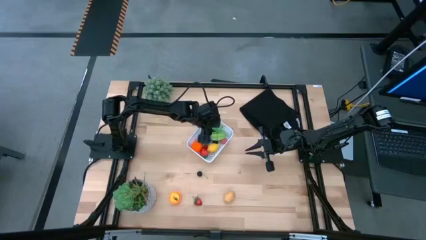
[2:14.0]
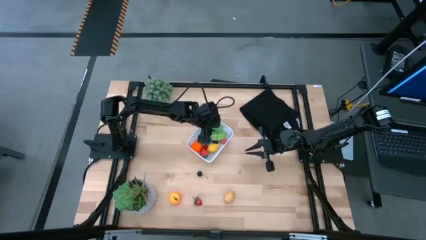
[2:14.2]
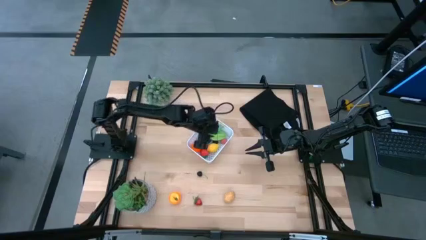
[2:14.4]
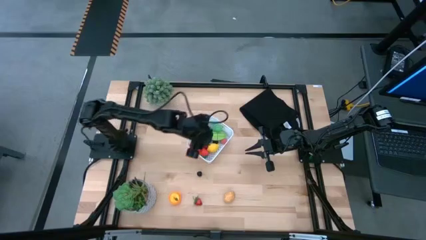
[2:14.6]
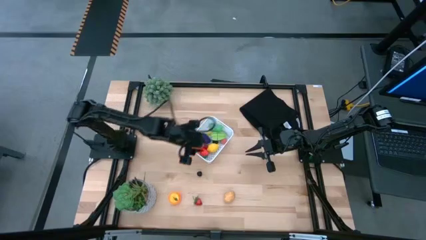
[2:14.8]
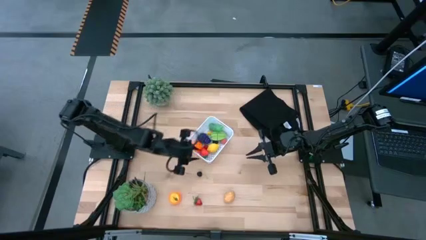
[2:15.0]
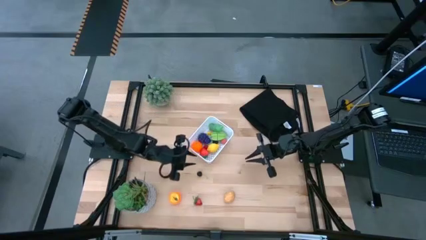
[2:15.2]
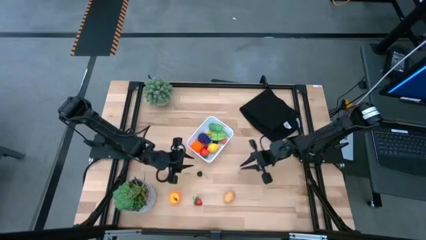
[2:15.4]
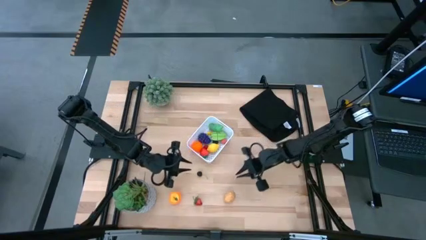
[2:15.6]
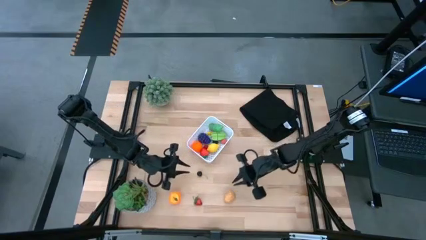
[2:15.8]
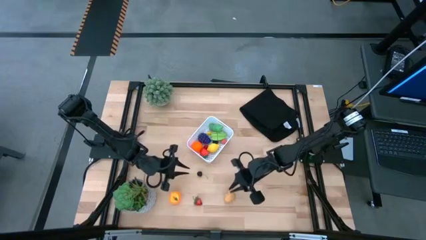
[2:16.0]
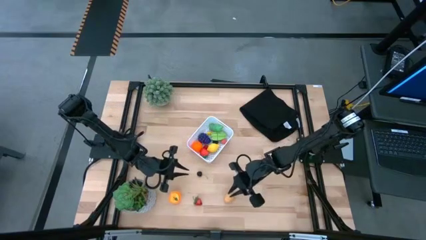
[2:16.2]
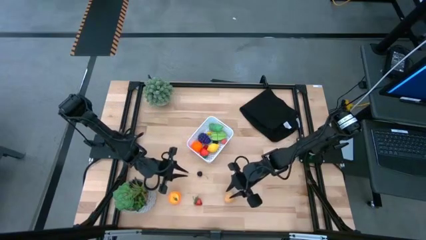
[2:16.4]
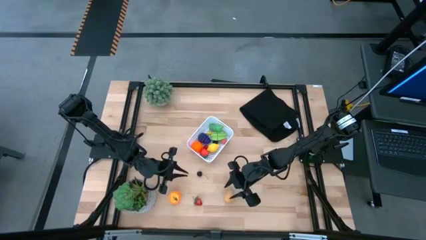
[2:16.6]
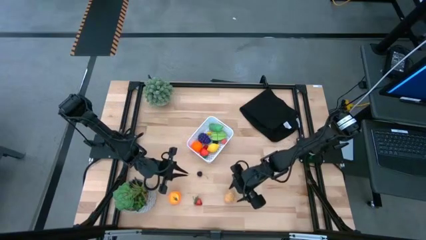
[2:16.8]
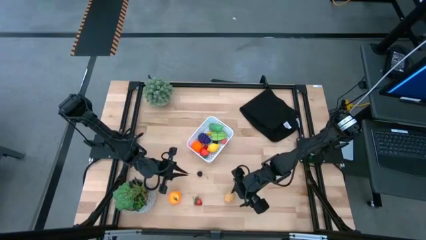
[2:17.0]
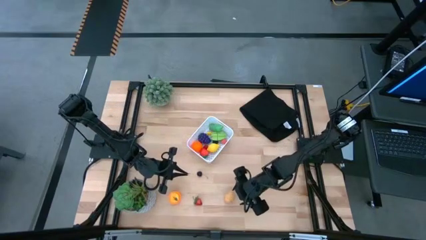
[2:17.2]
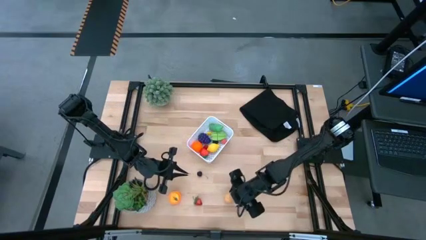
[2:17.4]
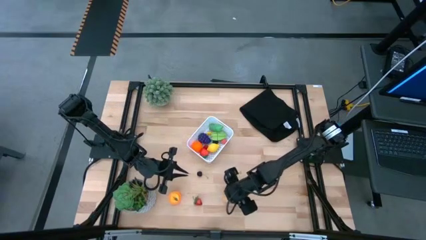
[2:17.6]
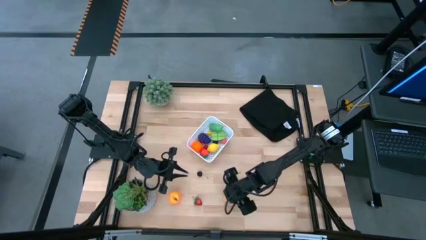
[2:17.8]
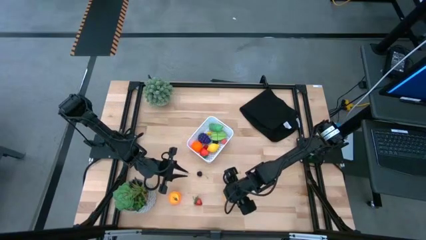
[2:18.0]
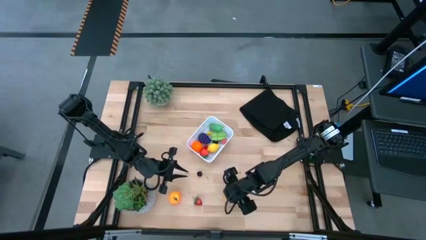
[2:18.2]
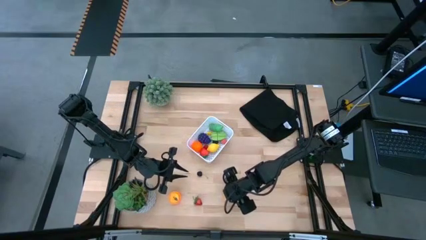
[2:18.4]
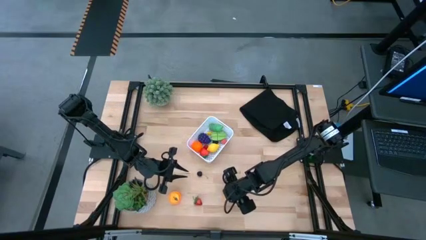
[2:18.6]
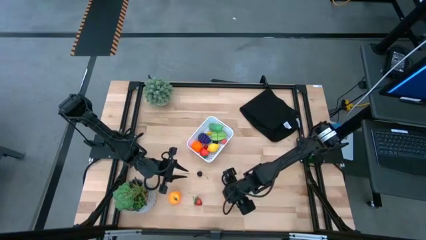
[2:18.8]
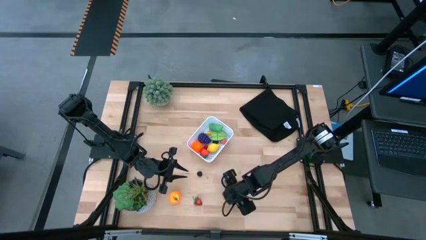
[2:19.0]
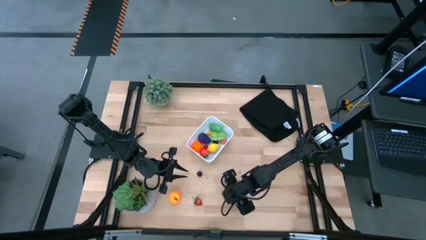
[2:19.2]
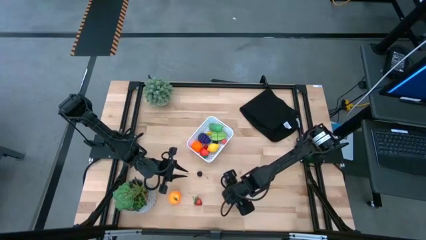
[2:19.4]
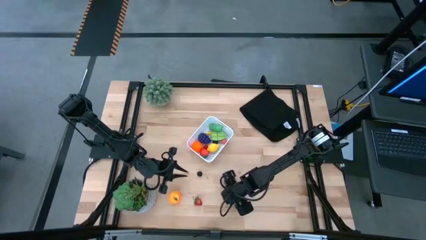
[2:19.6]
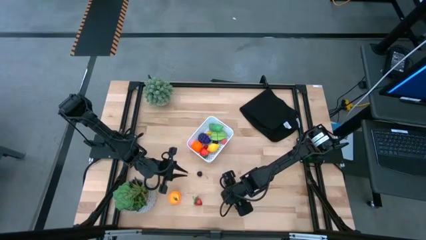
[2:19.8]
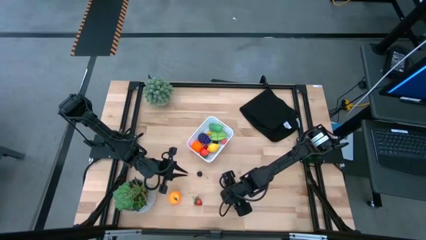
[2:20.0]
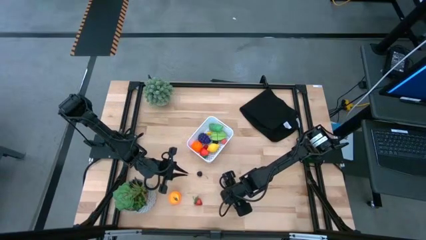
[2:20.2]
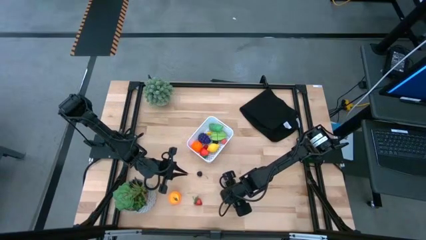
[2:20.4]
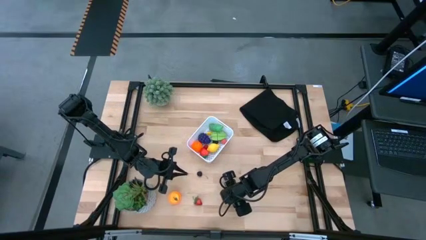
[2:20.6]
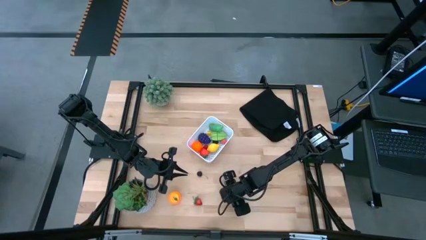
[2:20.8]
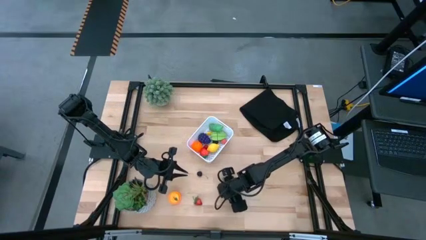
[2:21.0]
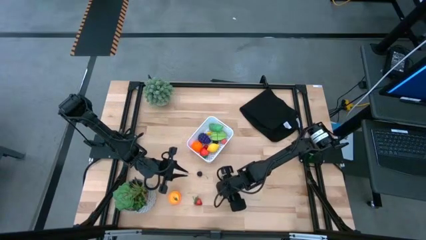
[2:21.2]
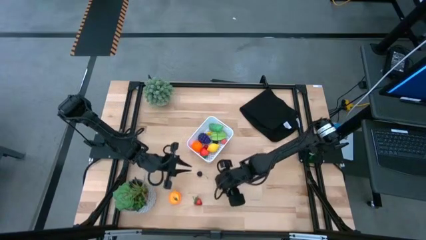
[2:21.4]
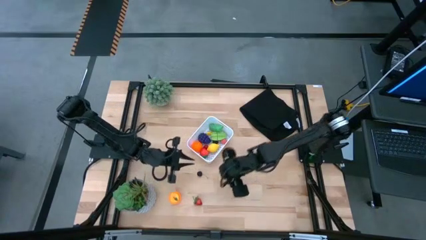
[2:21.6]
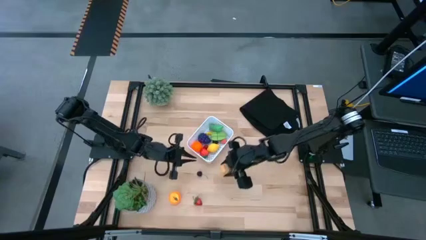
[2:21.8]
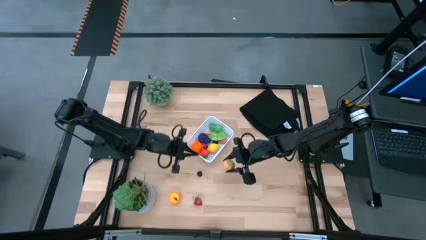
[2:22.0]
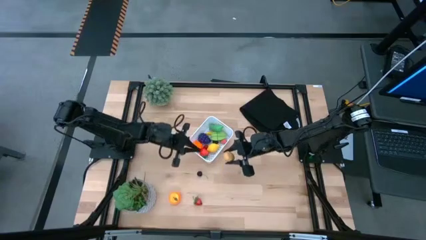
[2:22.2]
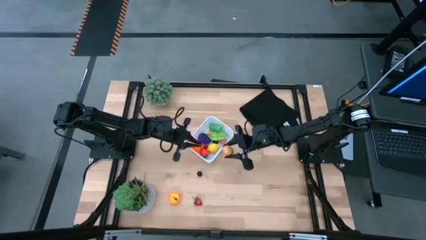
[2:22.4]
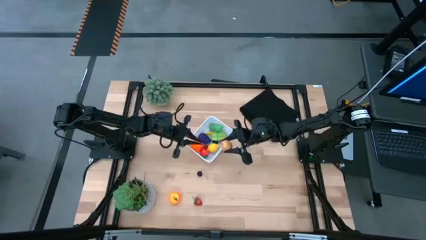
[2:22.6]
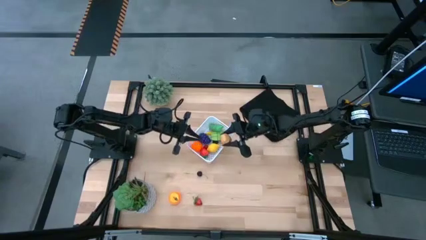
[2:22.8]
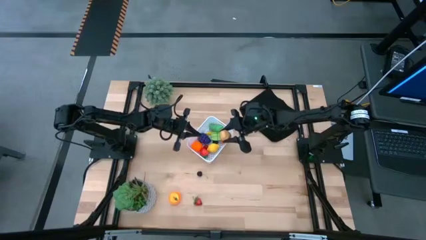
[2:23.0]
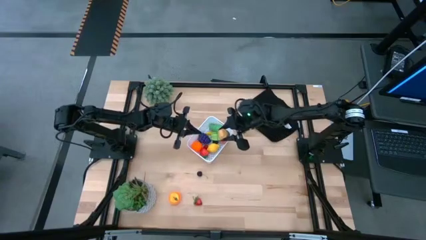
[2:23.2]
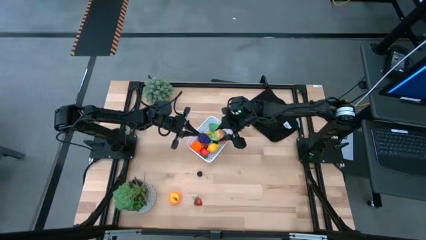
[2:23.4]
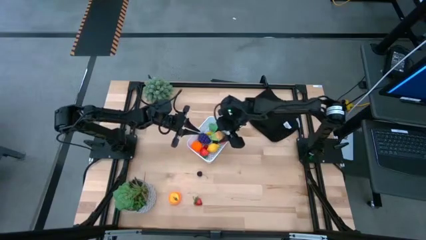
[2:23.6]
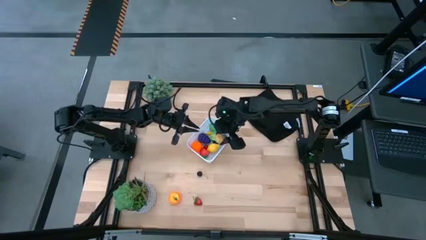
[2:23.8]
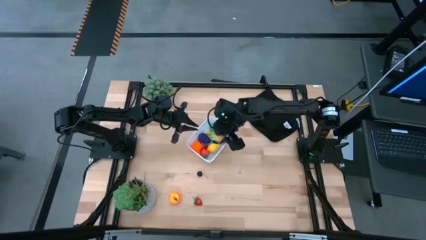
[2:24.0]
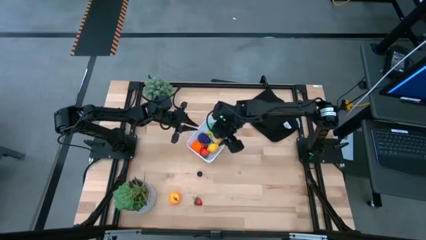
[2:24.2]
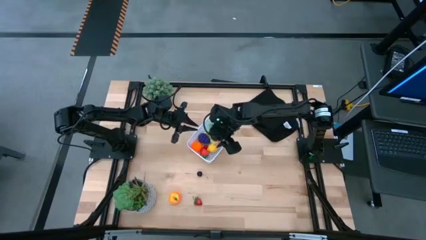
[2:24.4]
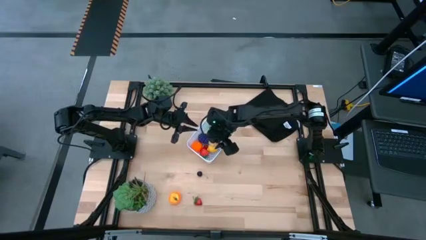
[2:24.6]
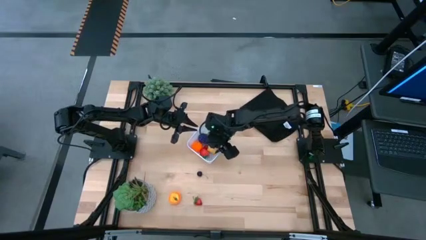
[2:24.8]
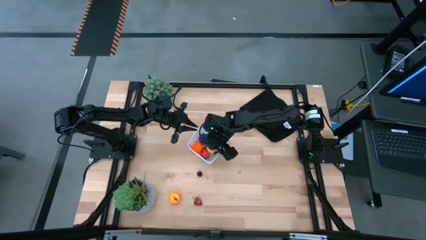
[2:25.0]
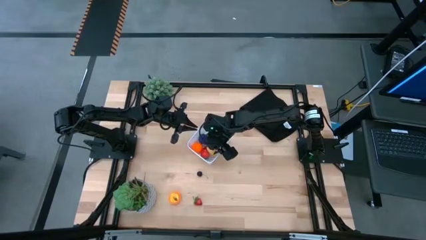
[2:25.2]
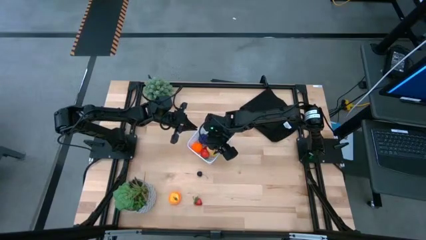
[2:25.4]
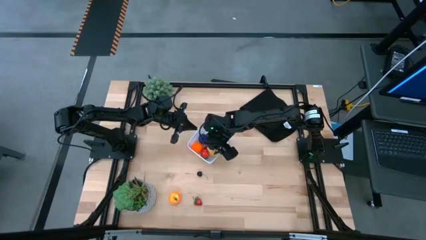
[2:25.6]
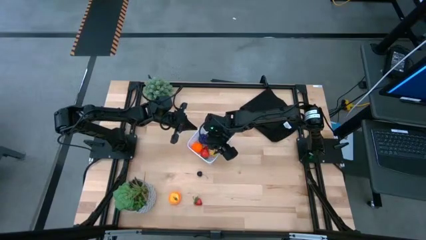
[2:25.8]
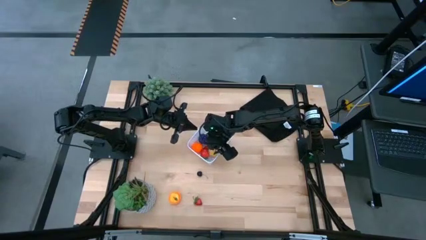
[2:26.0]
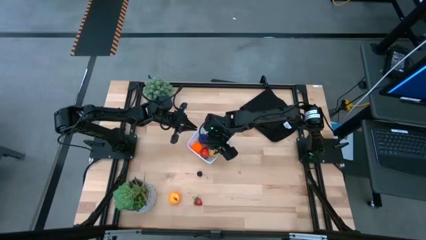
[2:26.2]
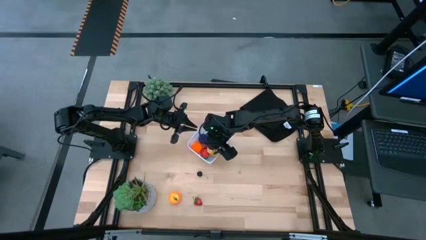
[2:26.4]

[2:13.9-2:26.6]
Task: Pick and placing Produce into tupperware
Put the potato into the white bin

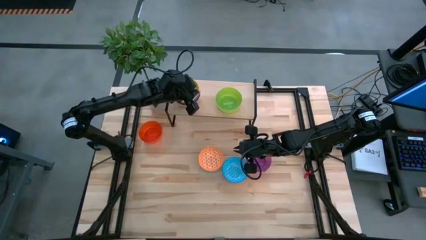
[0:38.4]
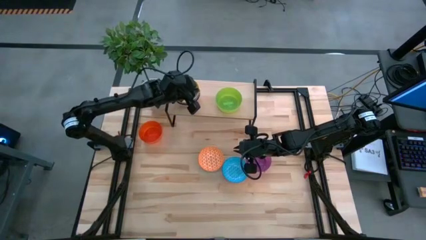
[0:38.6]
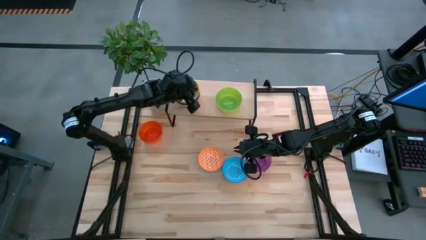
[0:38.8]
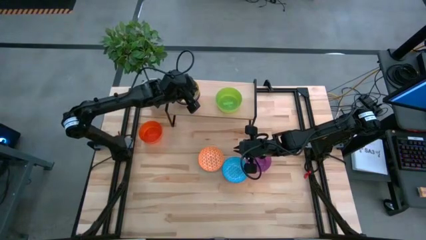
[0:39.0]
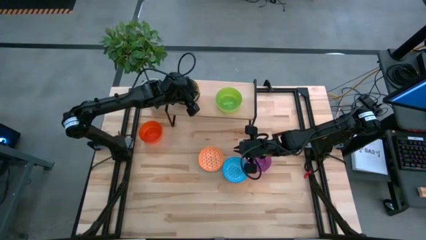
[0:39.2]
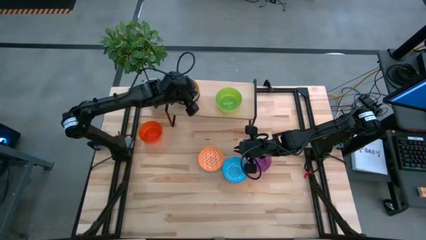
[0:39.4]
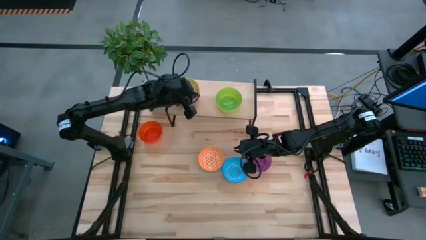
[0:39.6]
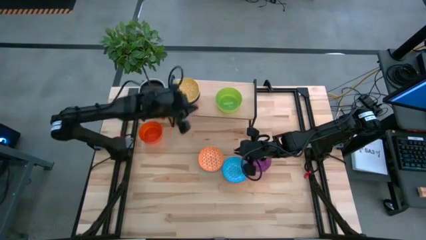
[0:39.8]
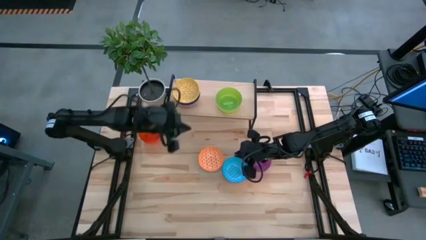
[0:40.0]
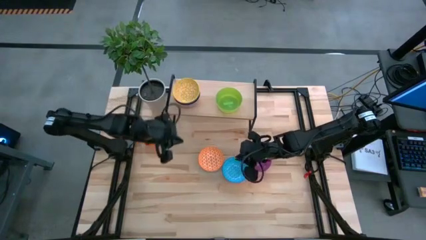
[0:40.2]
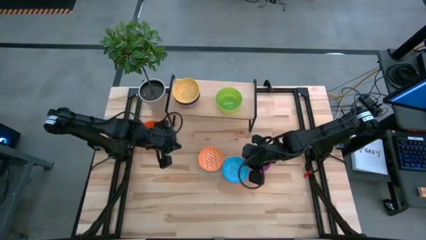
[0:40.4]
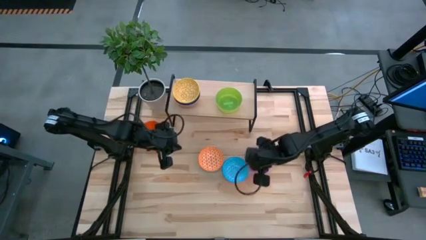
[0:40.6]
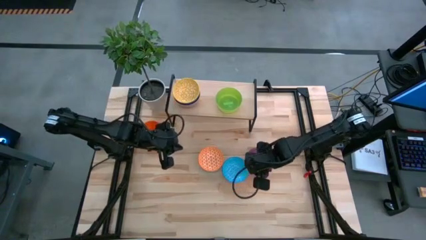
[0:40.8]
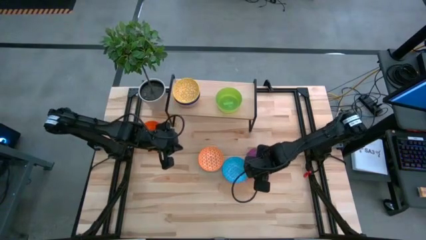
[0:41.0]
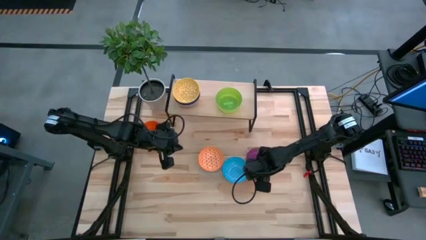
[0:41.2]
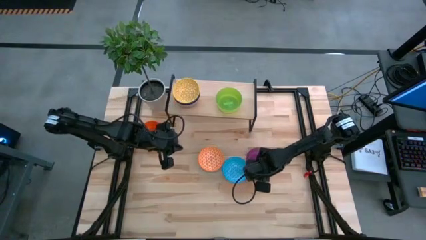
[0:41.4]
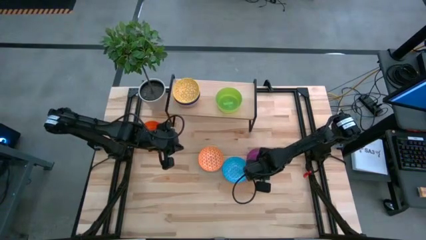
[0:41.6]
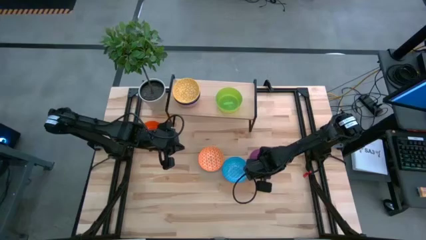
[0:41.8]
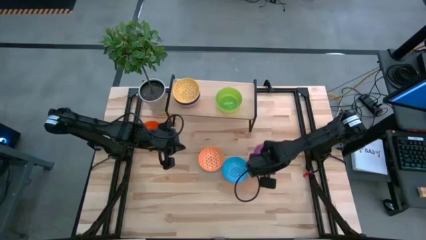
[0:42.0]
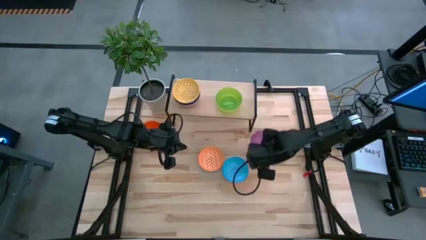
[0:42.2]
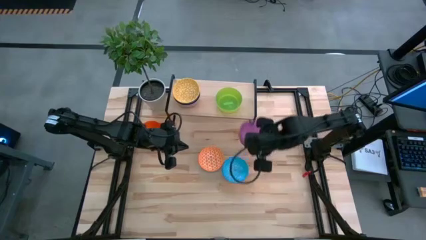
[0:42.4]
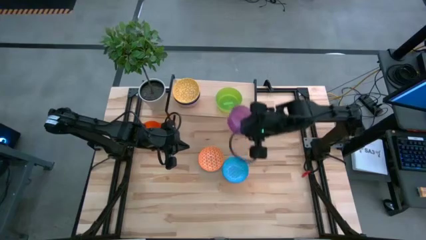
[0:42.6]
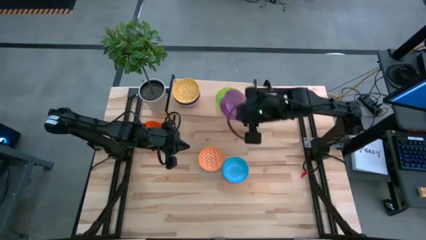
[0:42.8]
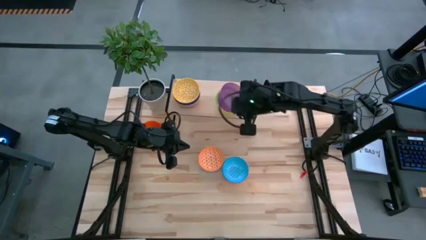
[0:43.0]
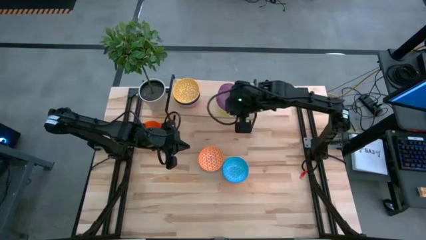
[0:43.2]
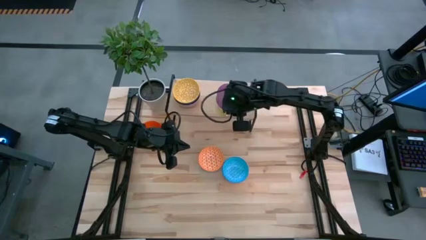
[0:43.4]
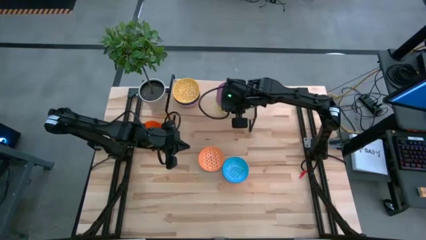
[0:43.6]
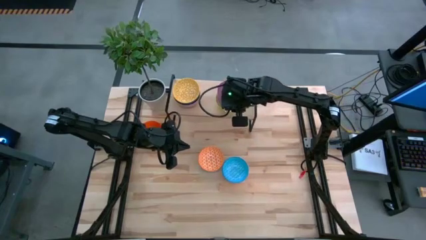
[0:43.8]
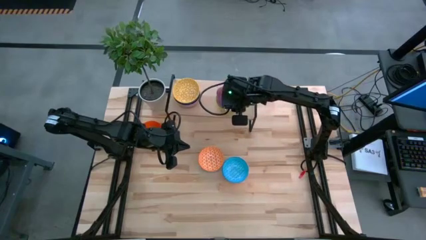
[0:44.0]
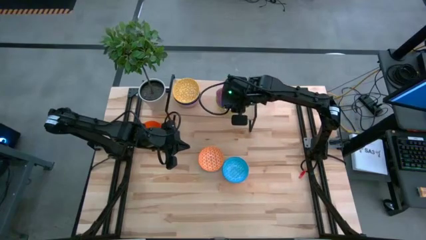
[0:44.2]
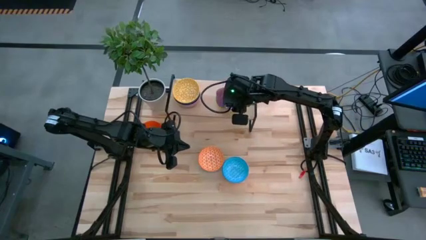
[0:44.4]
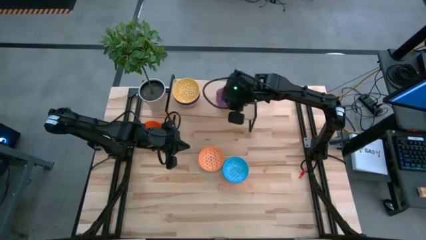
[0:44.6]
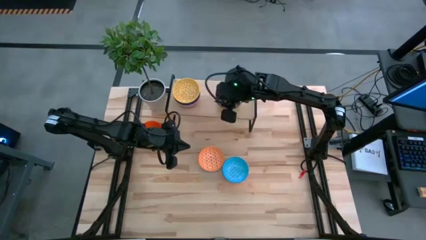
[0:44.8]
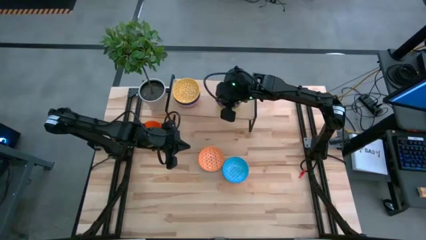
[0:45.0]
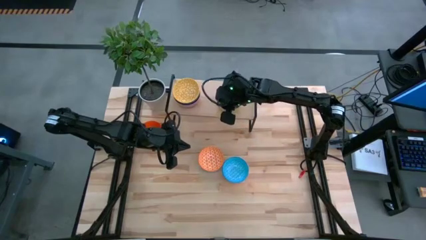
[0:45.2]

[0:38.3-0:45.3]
Task: Place and stack bowls onto a shelf
Stack the purple bowl into the green bowl on the shelf
